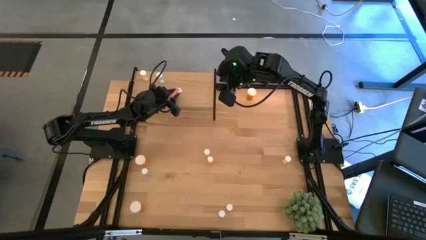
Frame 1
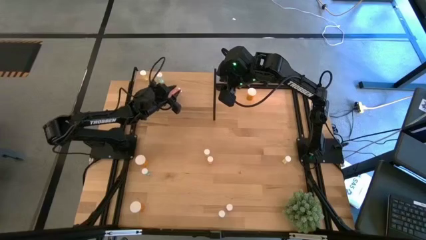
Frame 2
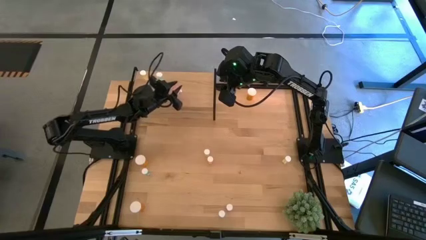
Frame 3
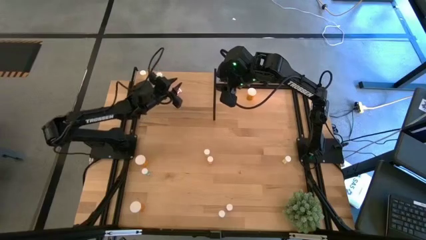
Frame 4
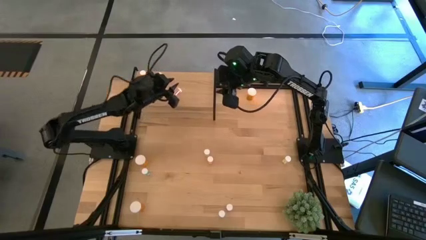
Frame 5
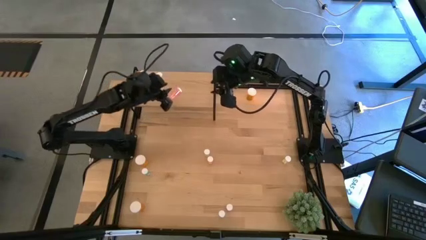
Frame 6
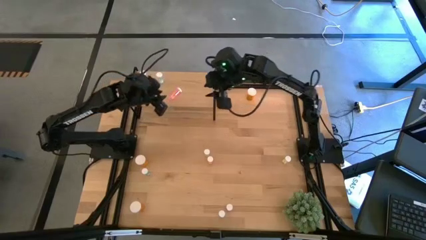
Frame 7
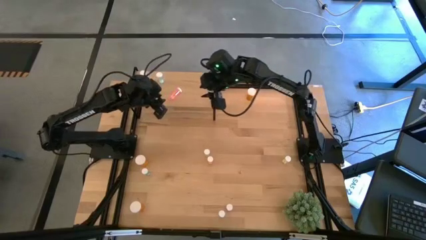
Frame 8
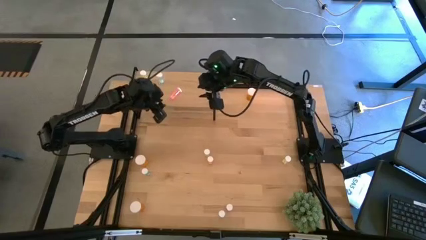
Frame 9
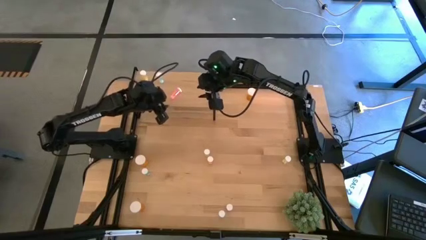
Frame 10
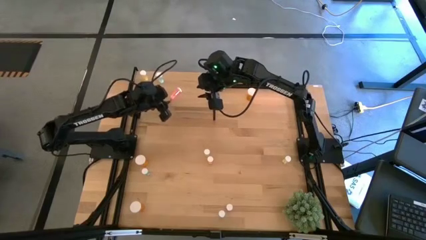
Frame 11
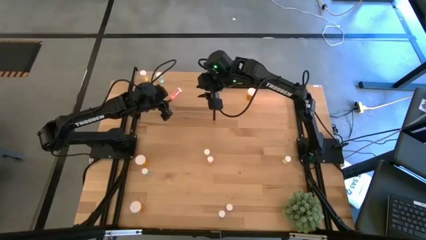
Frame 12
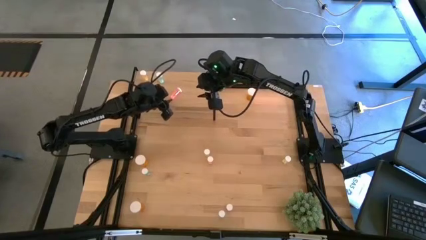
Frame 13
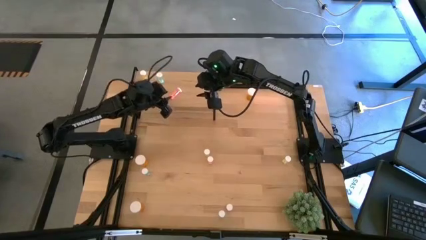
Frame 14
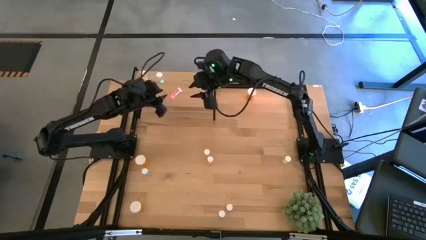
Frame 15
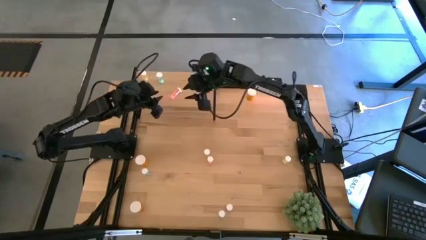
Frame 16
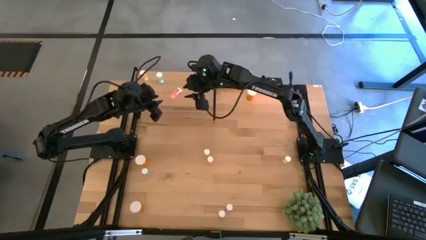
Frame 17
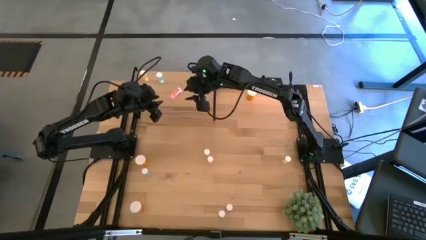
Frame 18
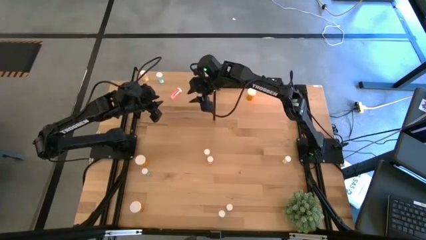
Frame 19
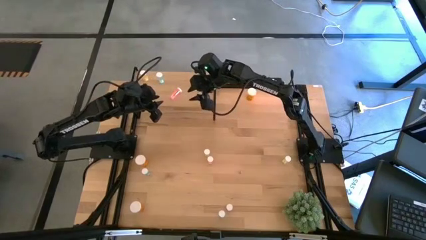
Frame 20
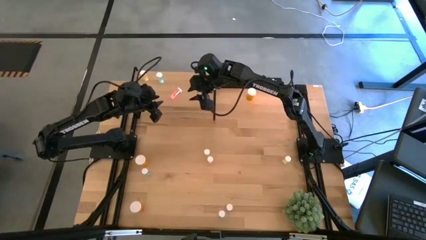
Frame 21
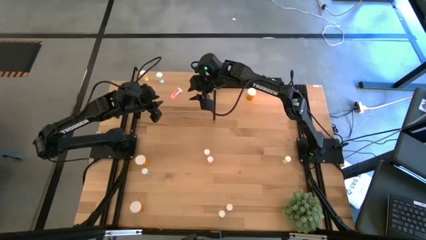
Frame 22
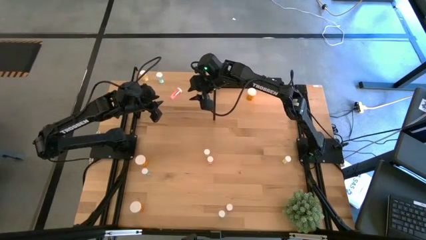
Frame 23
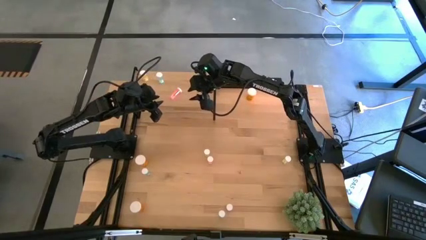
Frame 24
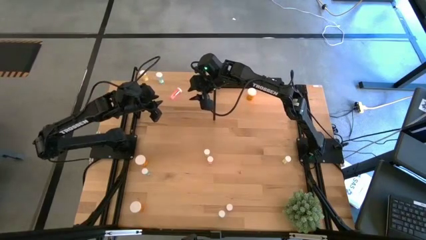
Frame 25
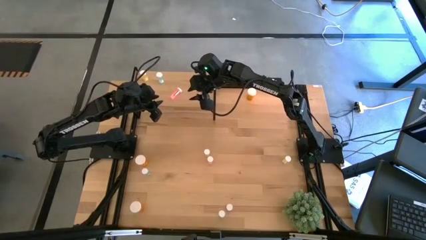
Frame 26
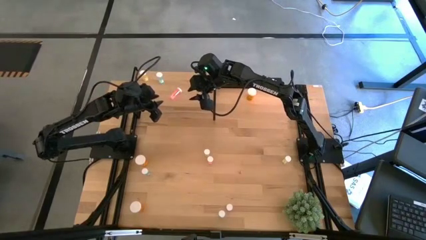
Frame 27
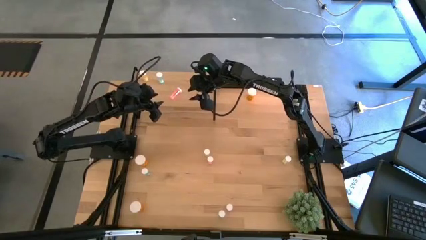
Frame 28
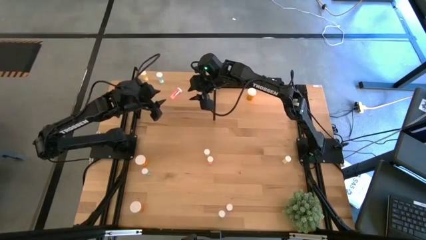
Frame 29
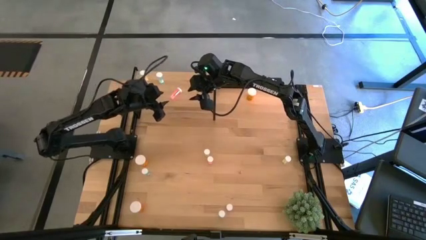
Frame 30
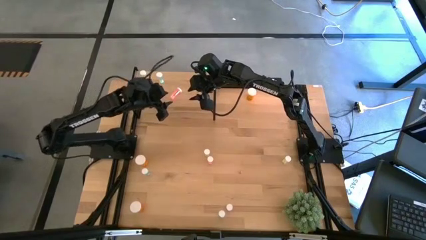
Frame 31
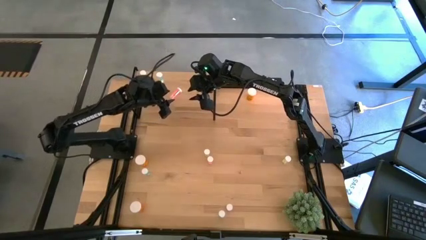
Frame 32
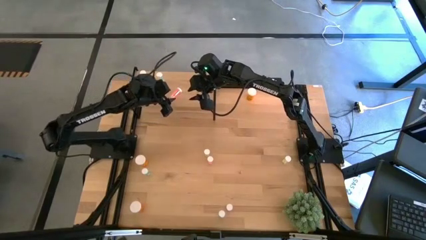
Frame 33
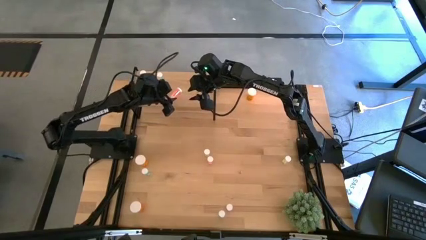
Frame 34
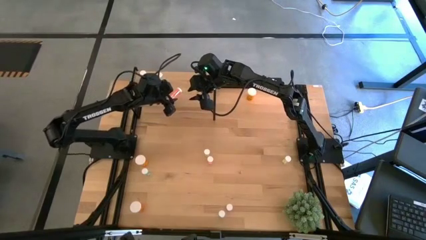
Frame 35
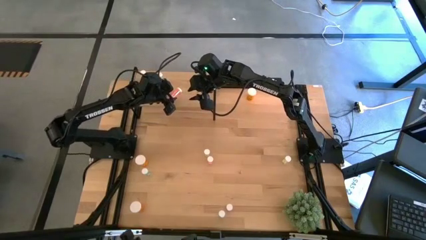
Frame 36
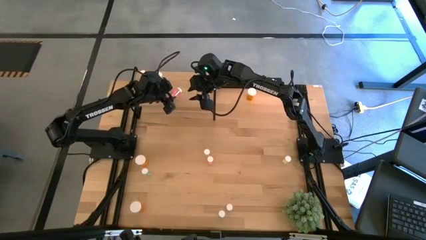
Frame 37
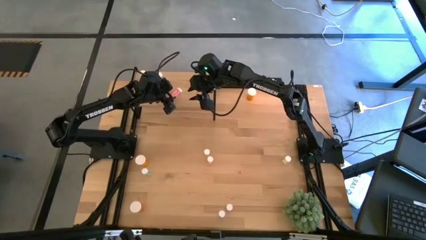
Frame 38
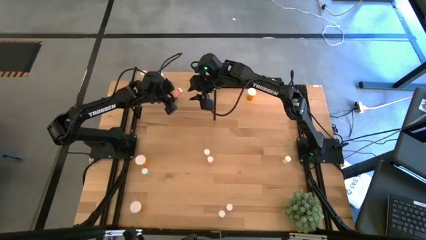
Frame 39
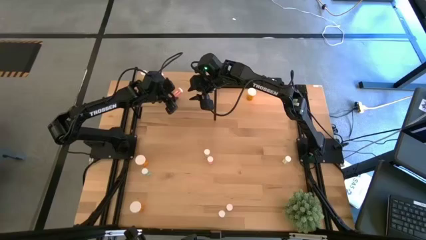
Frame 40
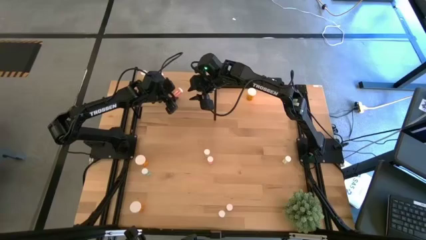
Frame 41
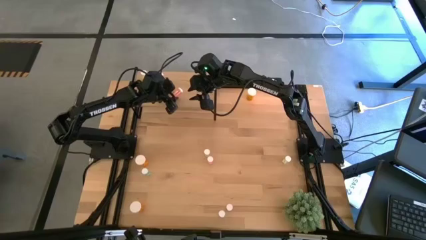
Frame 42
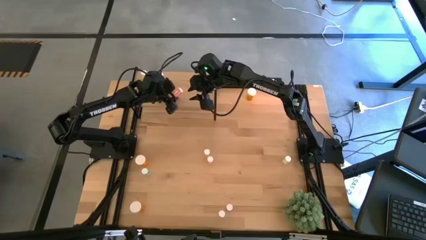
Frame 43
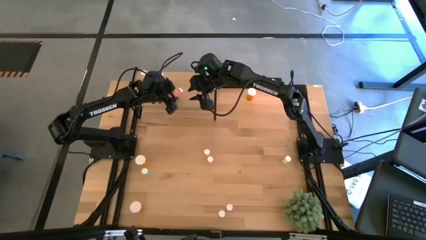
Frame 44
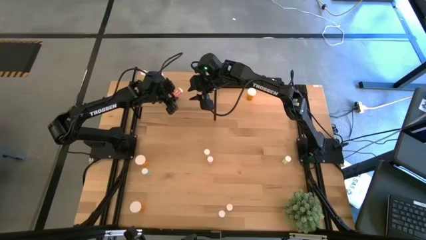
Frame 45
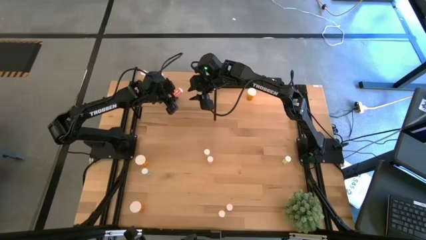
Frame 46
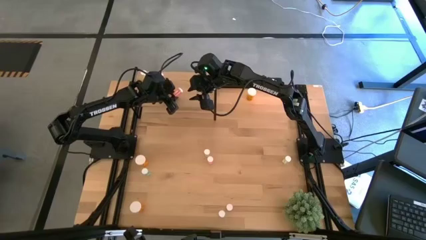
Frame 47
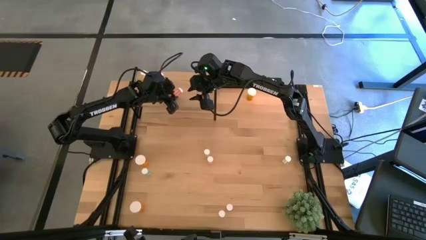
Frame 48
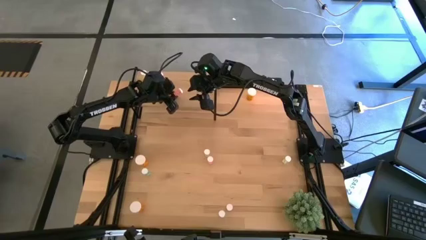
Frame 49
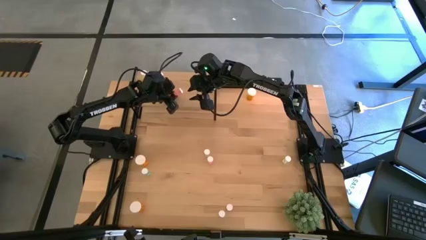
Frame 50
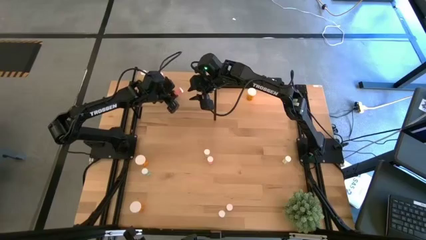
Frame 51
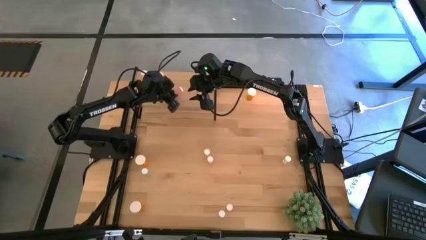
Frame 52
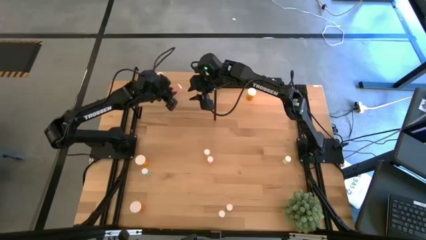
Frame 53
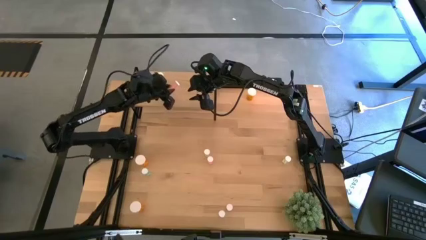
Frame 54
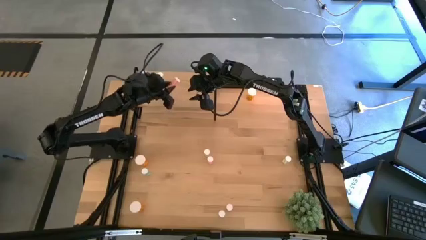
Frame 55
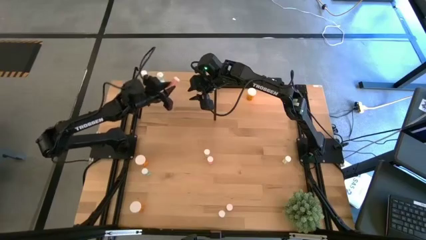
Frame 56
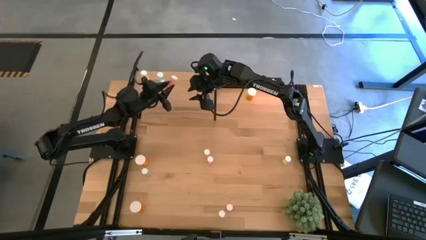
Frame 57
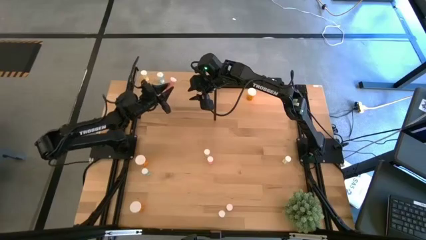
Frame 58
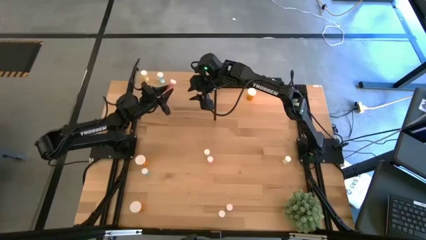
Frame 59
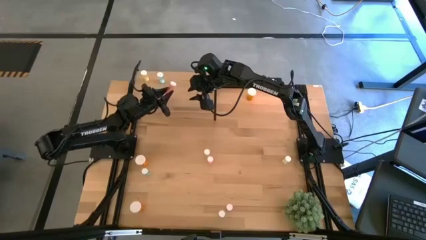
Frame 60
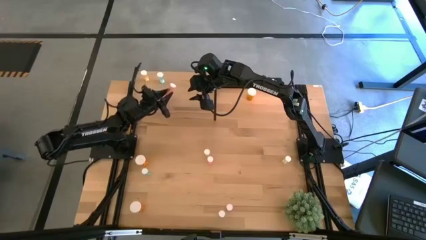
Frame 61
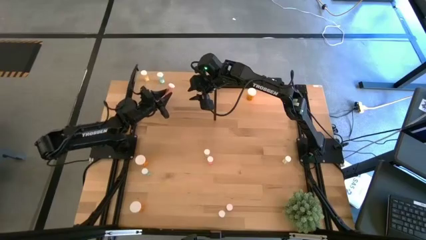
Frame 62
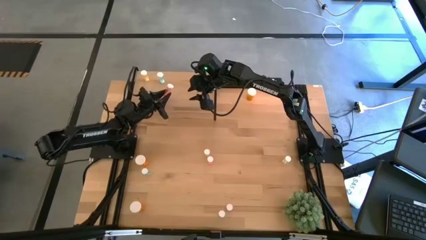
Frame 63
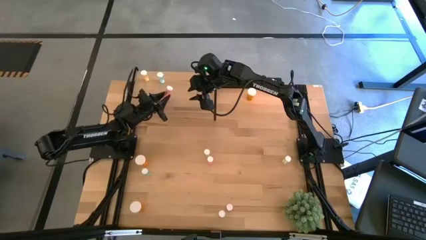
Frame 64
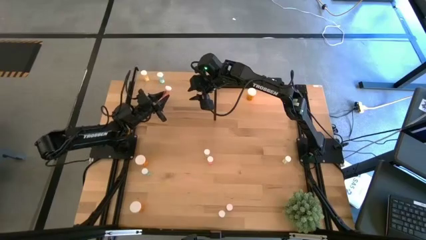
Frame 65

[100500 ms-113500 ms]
Task: Pick and place medicine bottles onto shelf by color
Put the top right small red pill bottle on the shelf
